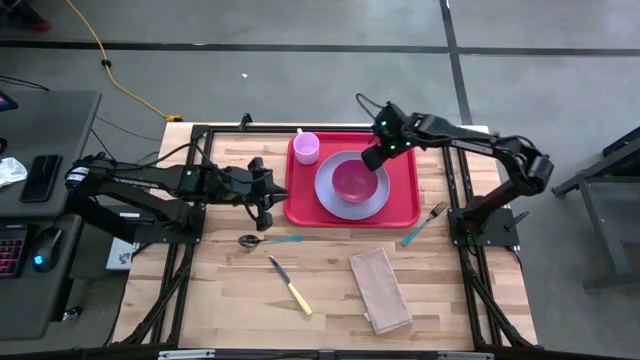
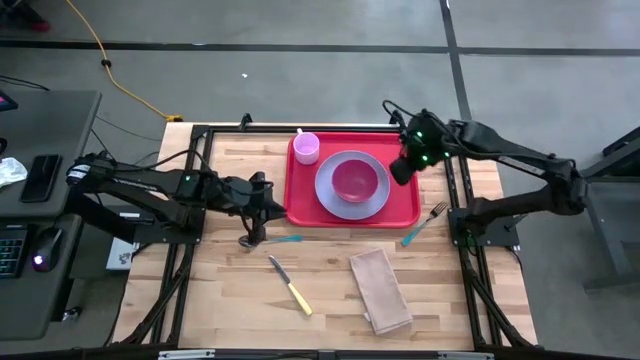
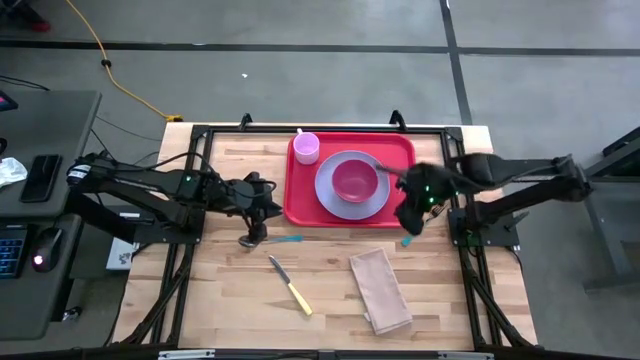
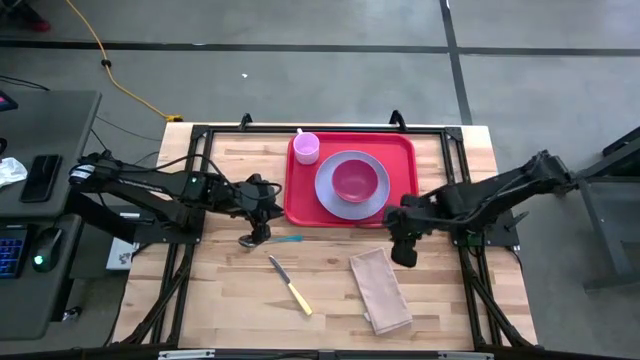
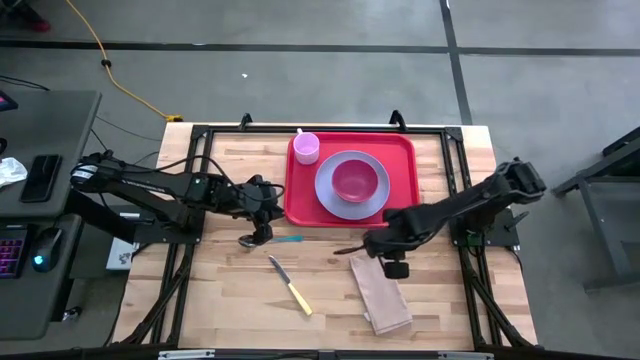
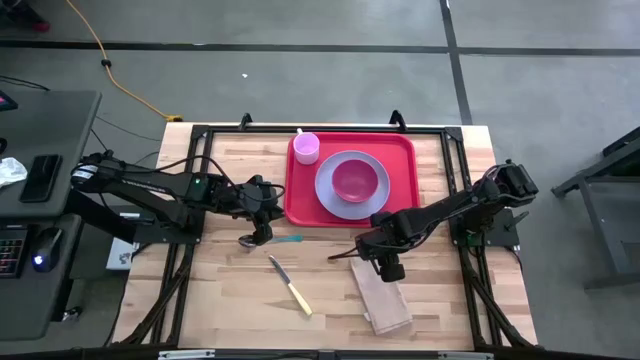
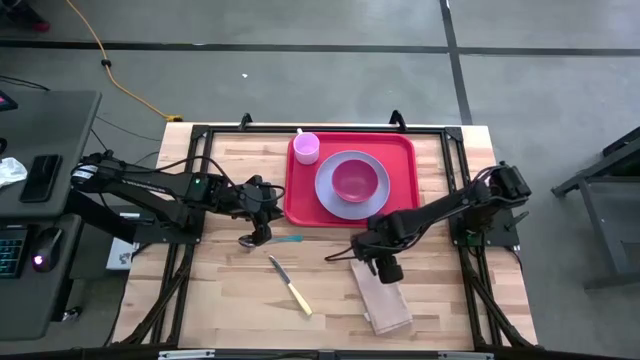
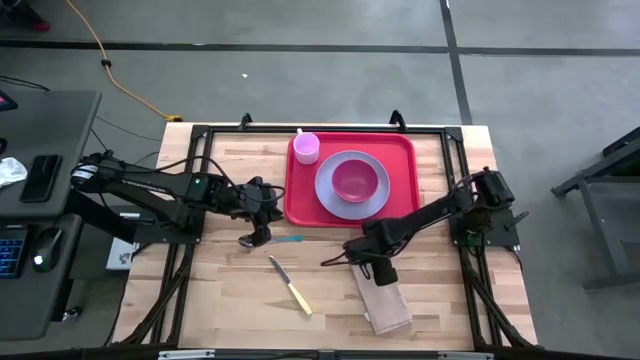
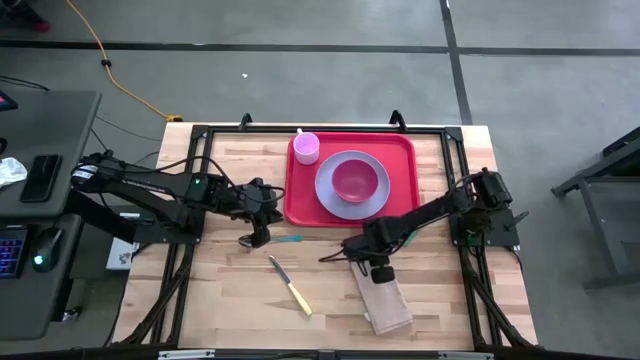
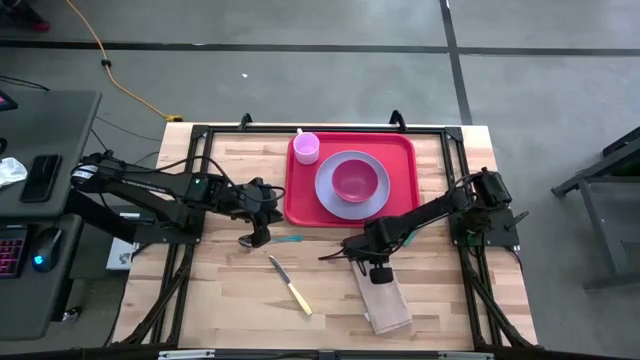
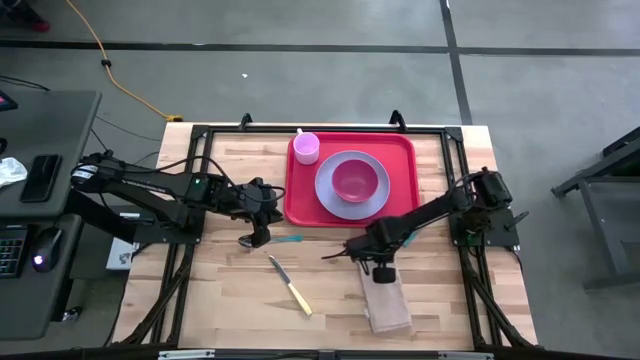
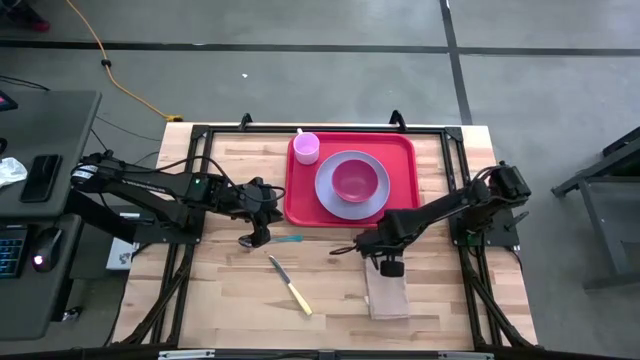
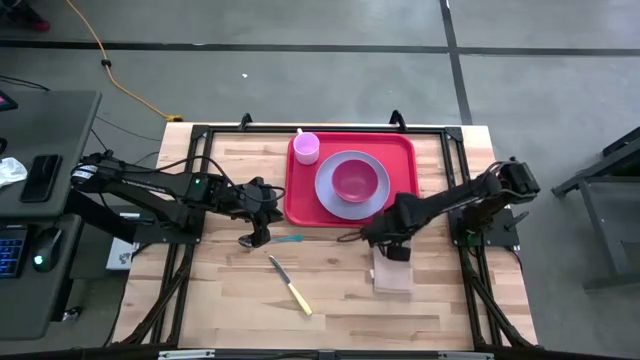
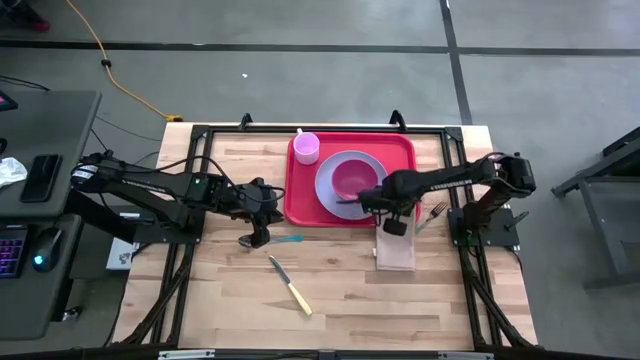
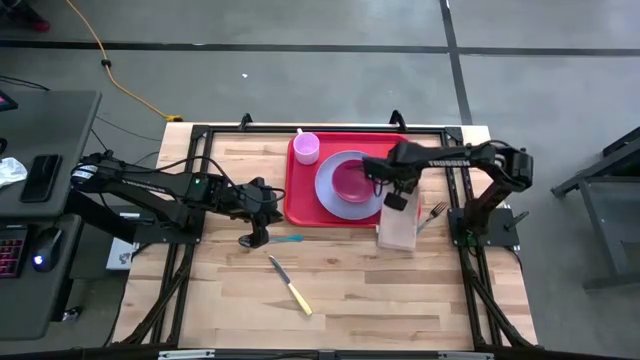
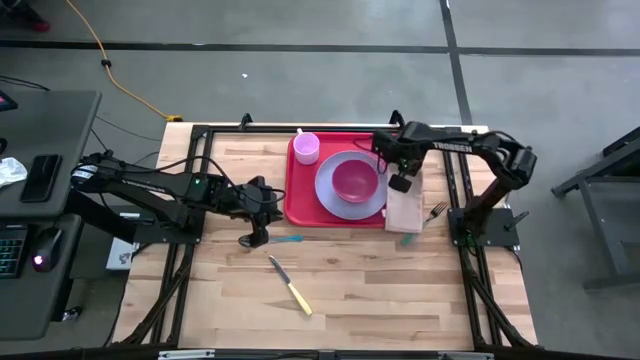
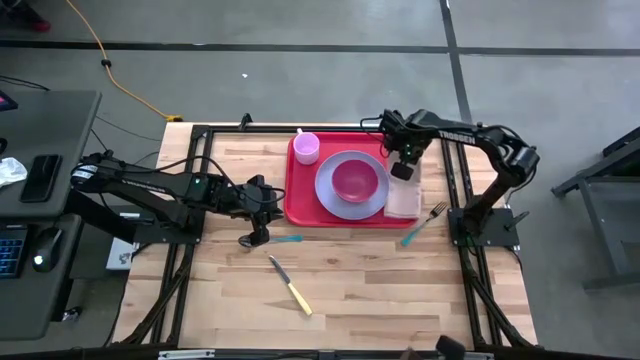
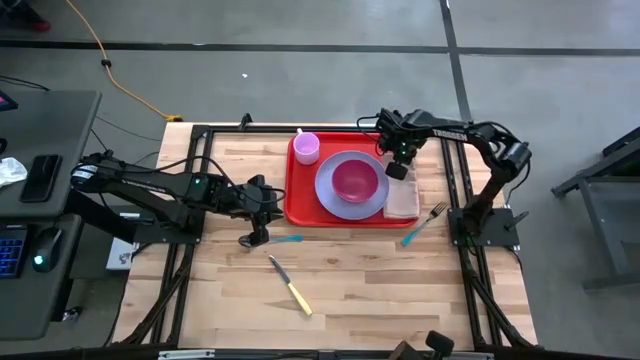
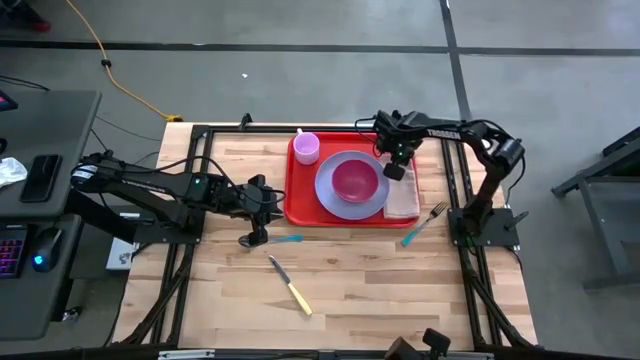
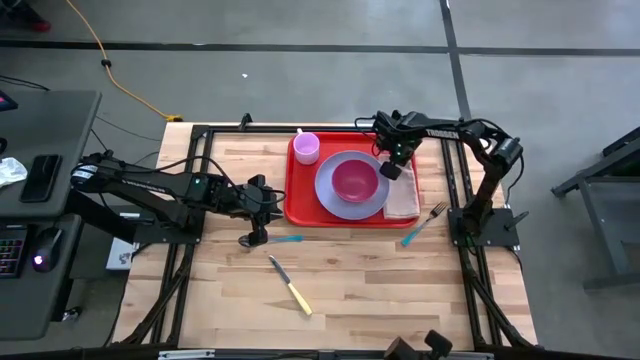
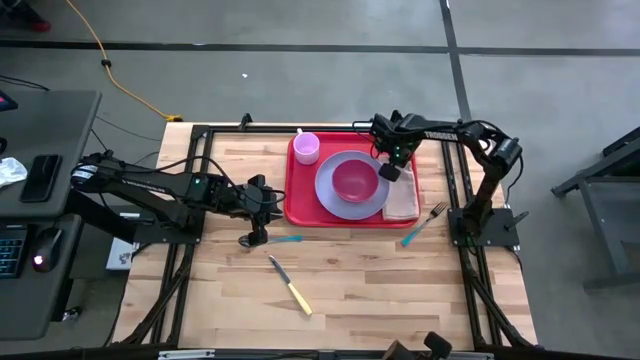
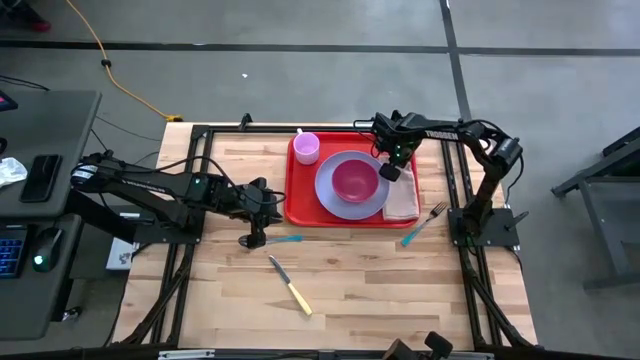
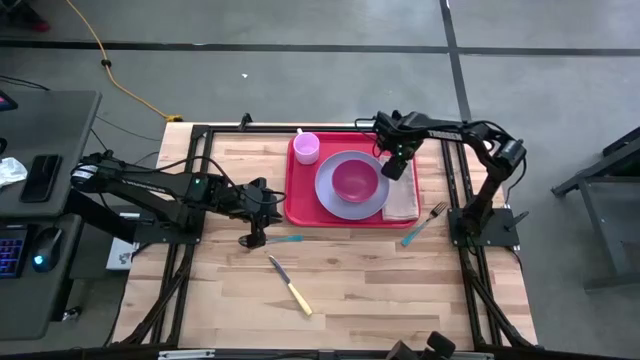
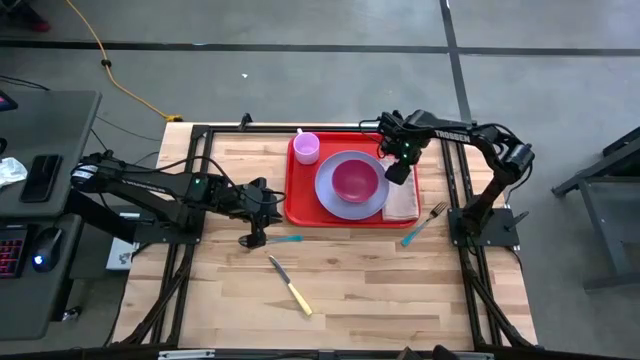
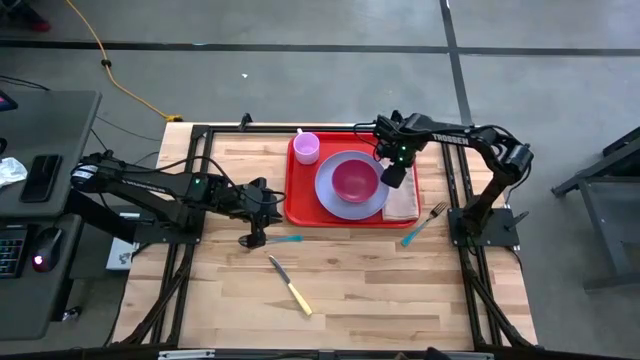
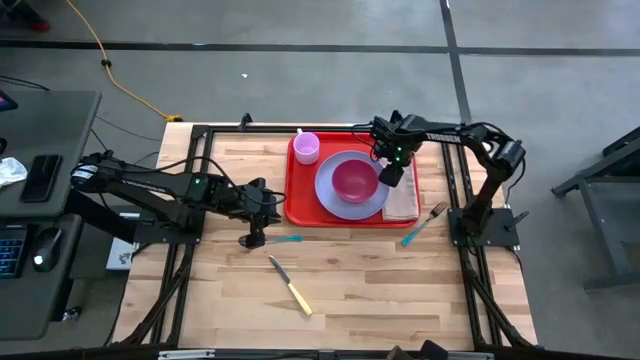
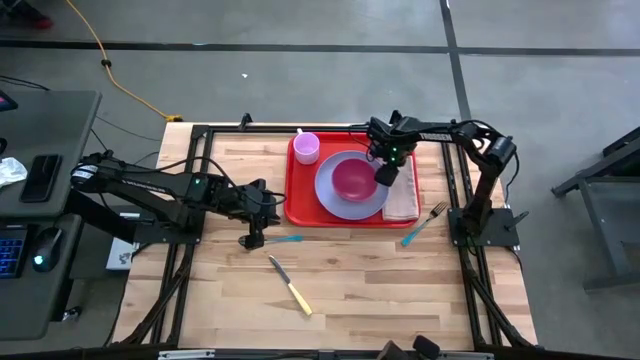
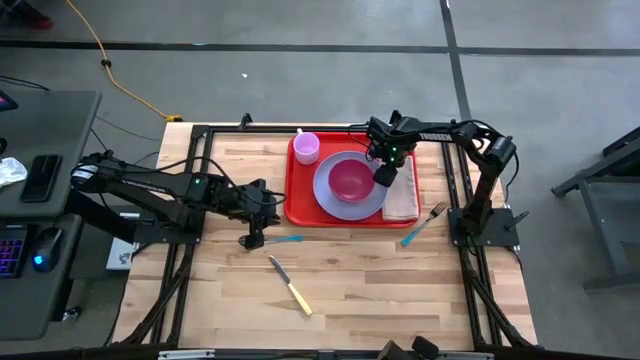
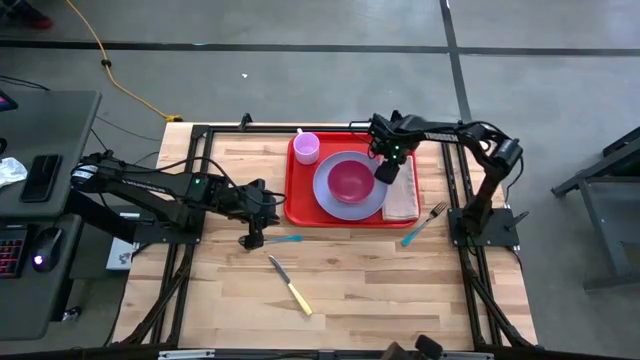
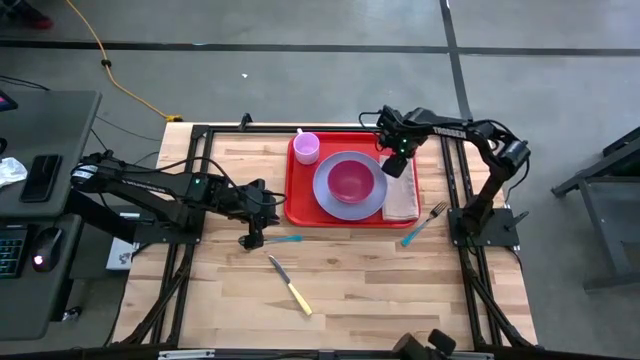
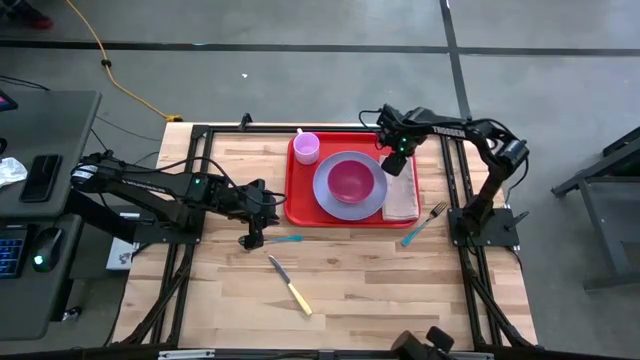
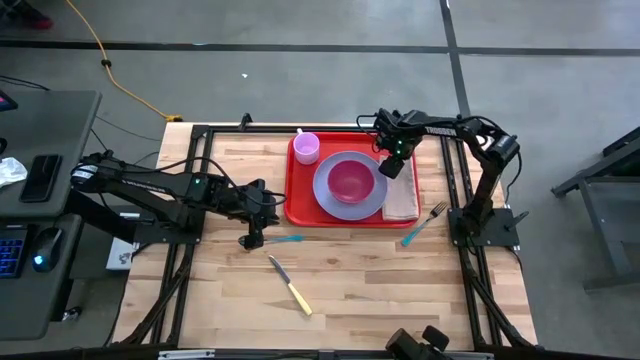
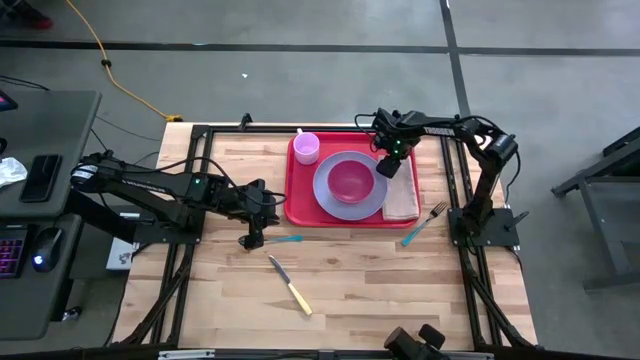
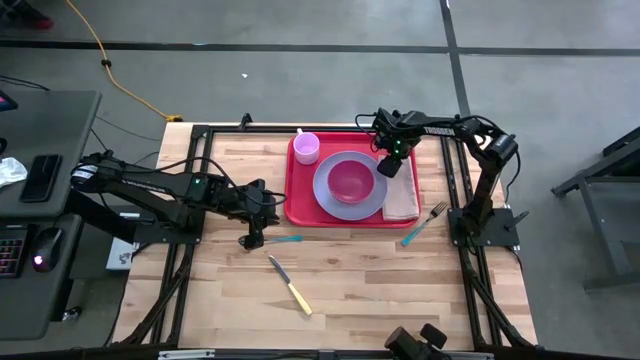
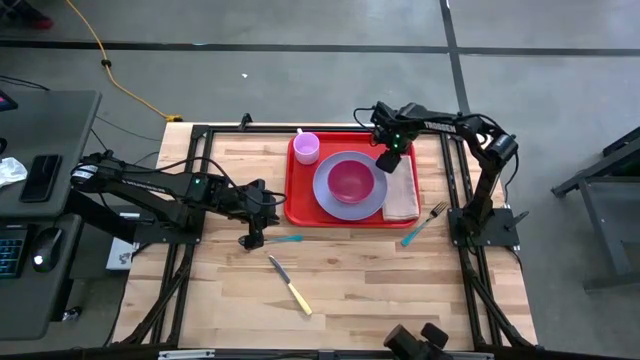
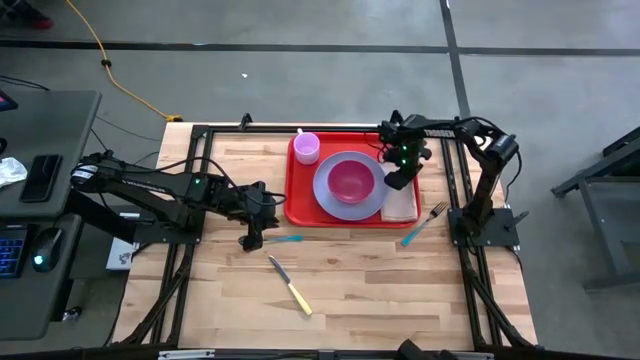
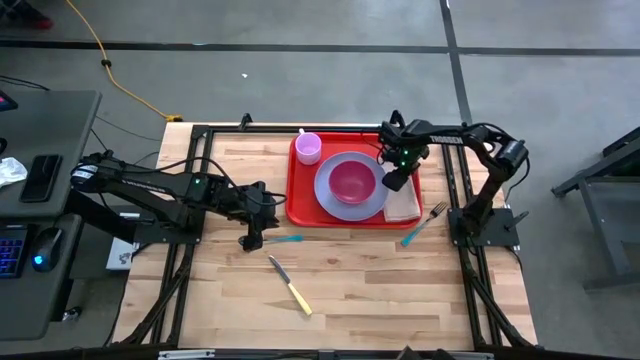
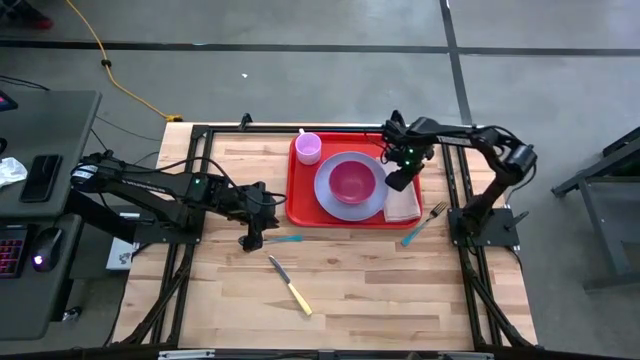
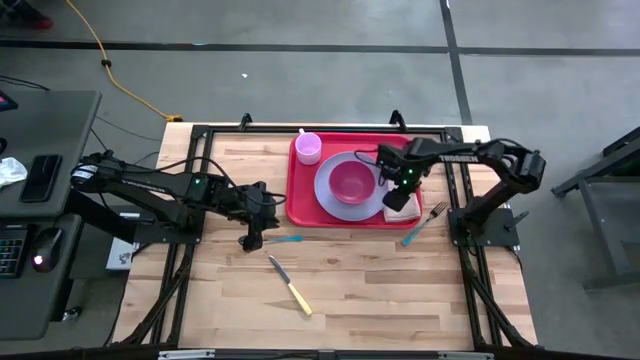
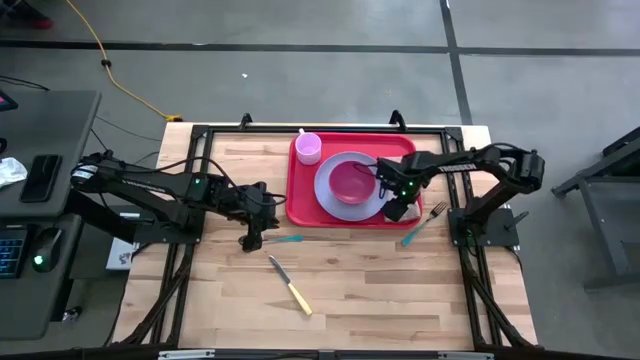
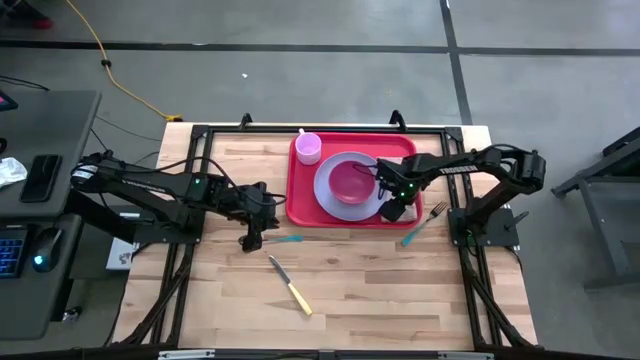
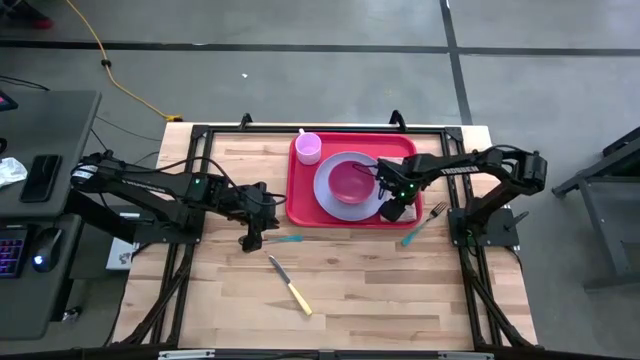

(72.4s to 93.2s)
Task: Set up tray
Put the napkin on the red tray to the right of the purple plate
